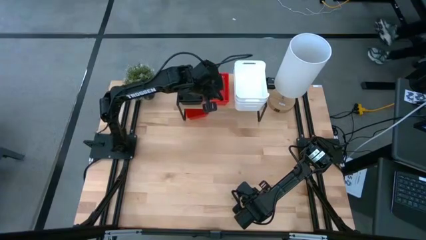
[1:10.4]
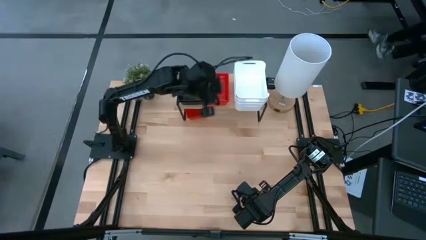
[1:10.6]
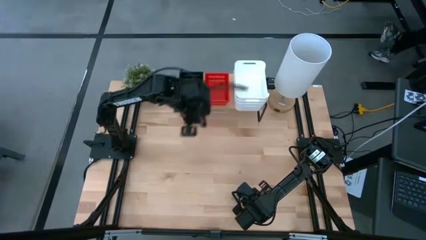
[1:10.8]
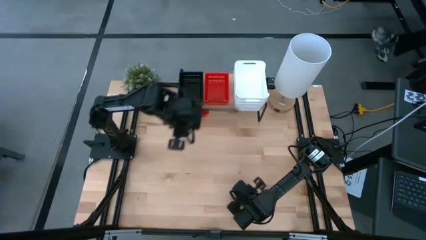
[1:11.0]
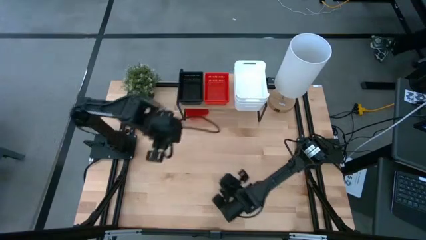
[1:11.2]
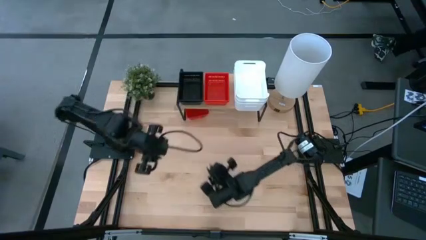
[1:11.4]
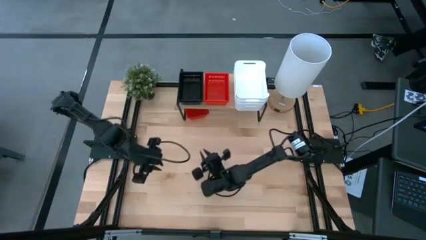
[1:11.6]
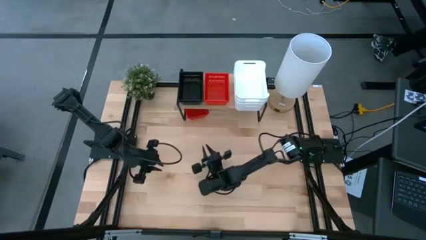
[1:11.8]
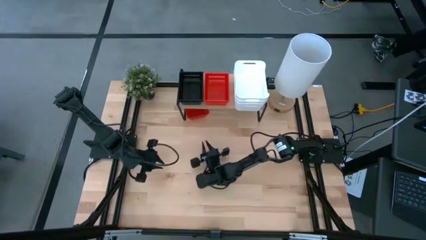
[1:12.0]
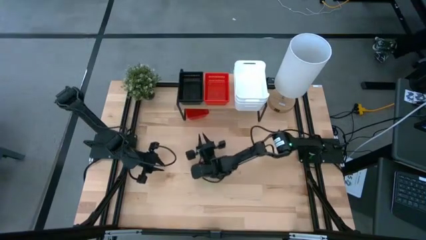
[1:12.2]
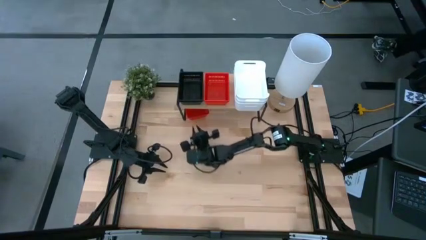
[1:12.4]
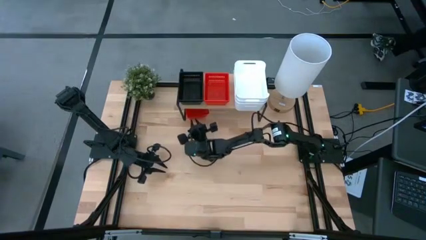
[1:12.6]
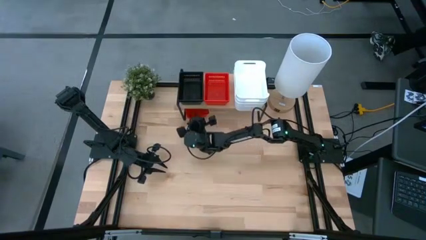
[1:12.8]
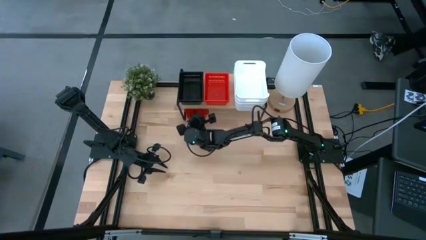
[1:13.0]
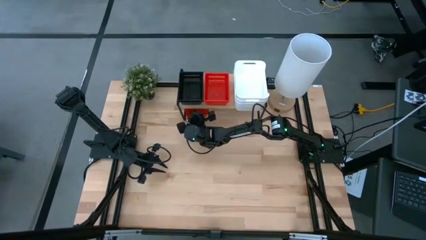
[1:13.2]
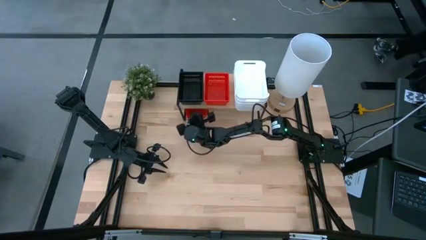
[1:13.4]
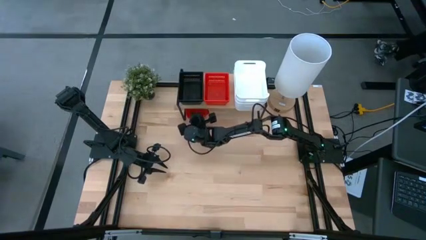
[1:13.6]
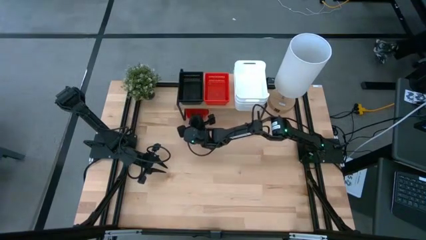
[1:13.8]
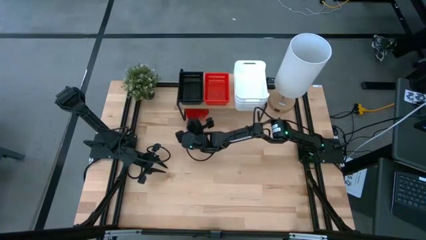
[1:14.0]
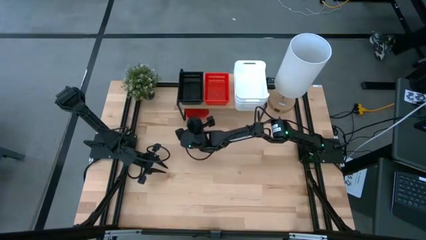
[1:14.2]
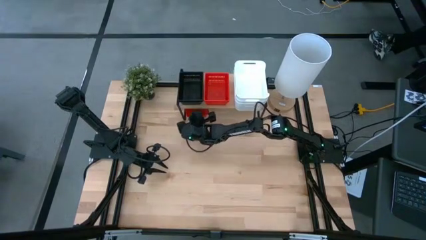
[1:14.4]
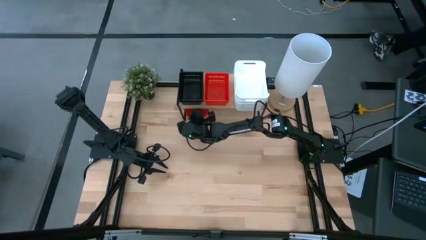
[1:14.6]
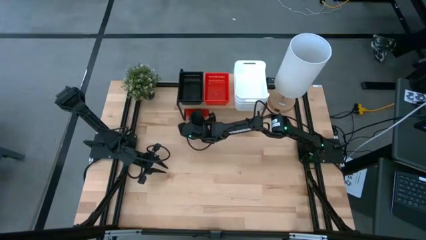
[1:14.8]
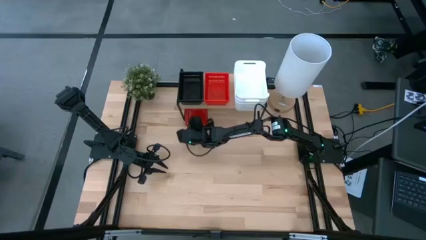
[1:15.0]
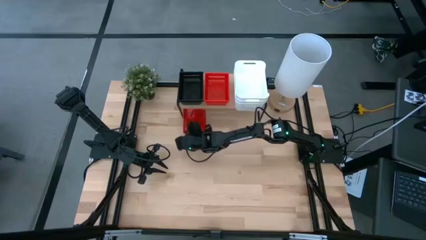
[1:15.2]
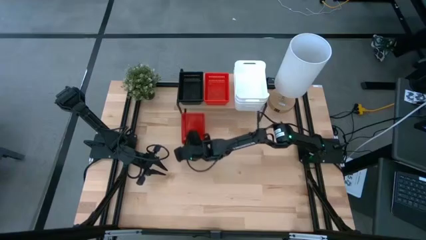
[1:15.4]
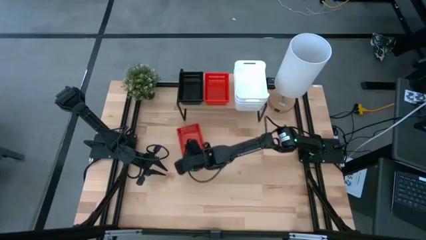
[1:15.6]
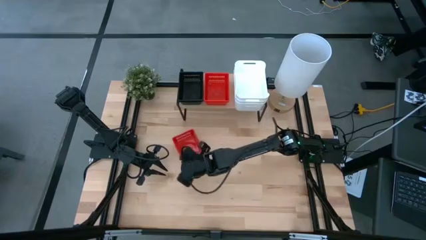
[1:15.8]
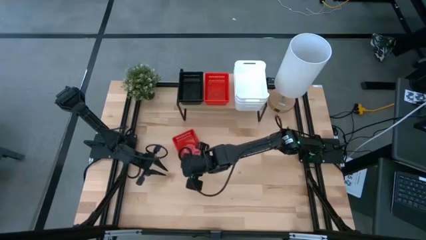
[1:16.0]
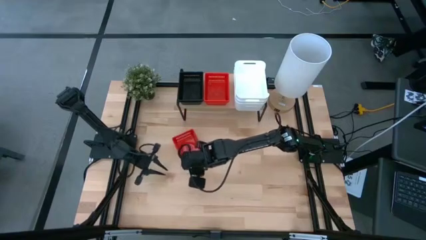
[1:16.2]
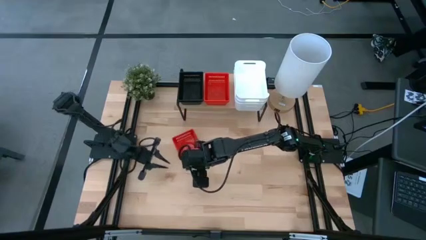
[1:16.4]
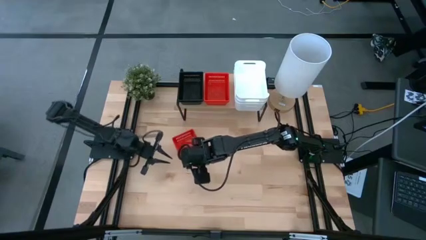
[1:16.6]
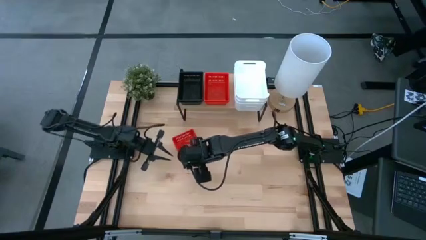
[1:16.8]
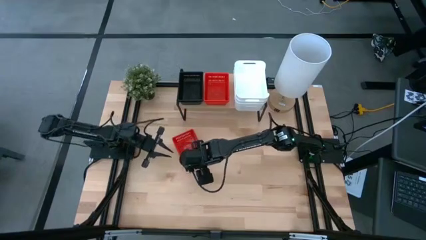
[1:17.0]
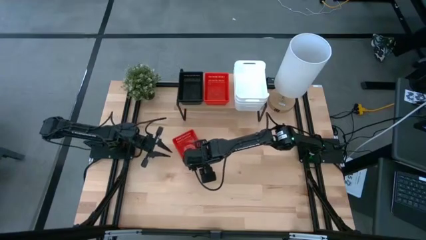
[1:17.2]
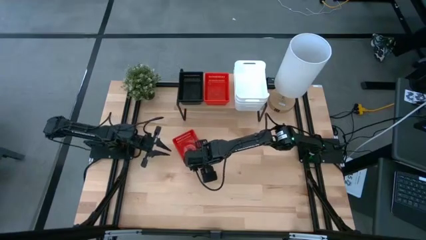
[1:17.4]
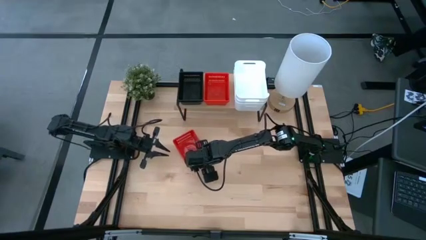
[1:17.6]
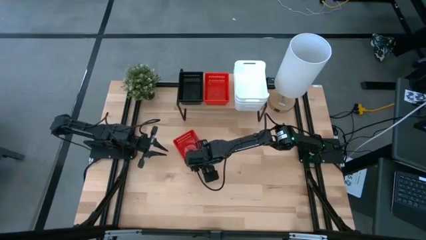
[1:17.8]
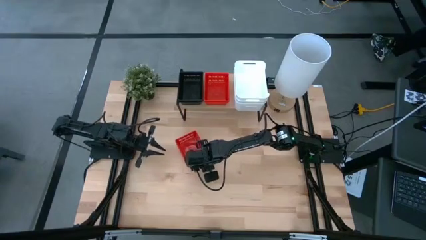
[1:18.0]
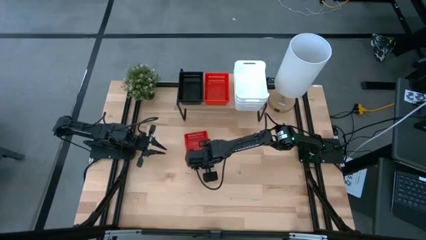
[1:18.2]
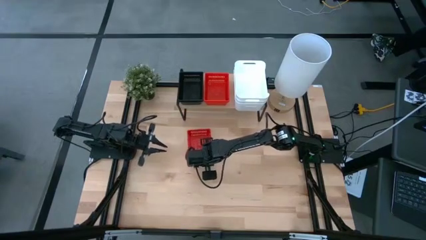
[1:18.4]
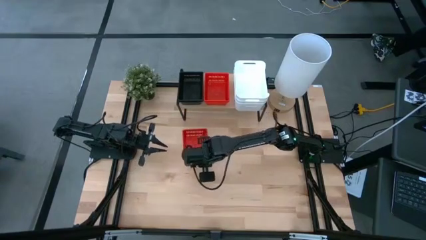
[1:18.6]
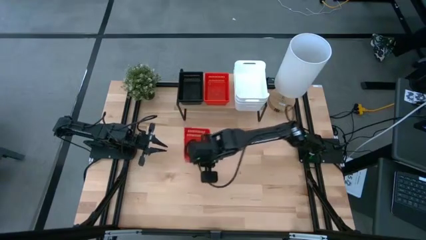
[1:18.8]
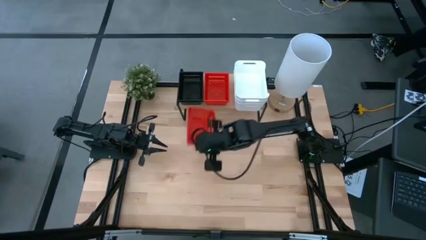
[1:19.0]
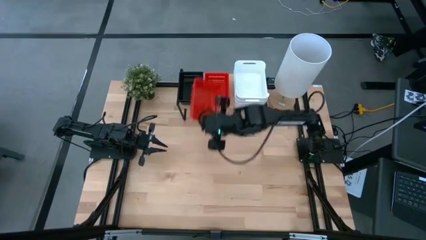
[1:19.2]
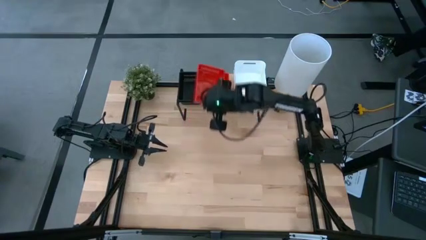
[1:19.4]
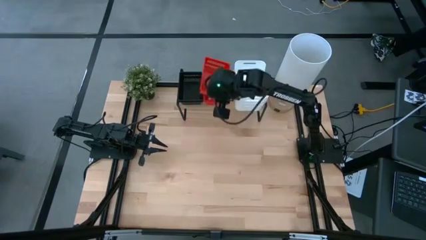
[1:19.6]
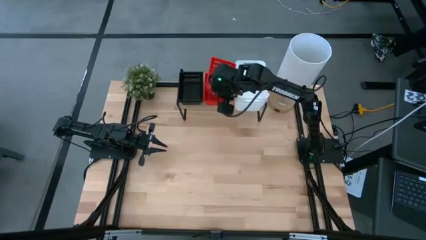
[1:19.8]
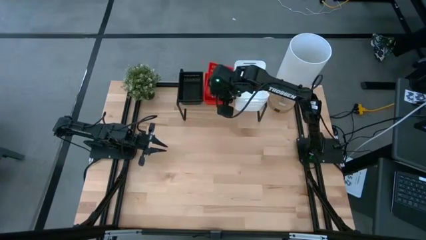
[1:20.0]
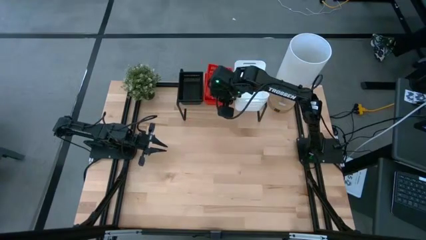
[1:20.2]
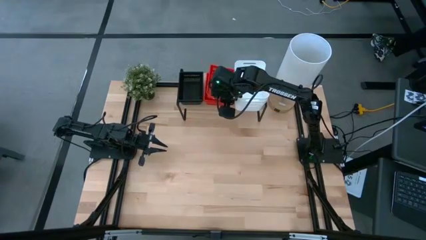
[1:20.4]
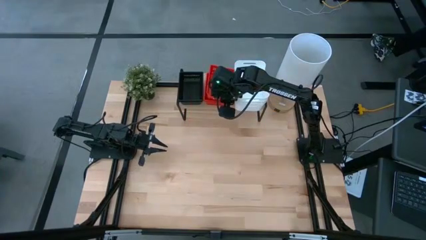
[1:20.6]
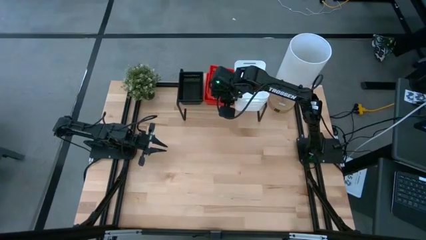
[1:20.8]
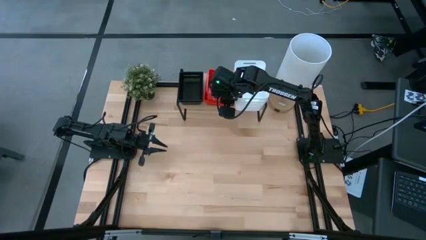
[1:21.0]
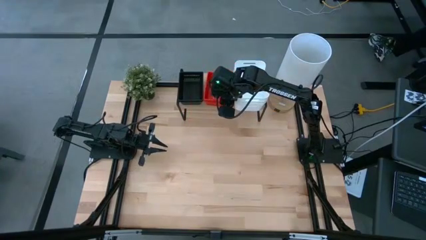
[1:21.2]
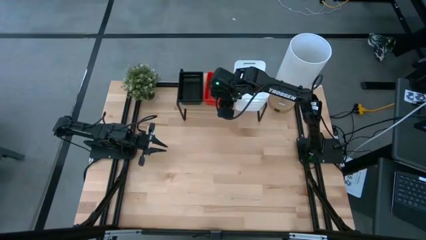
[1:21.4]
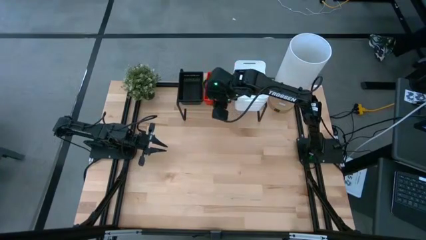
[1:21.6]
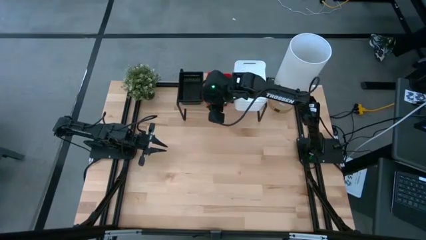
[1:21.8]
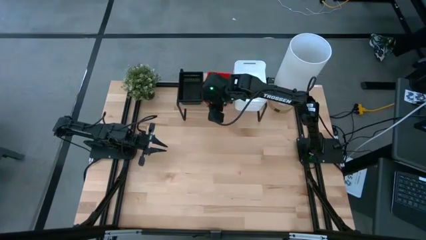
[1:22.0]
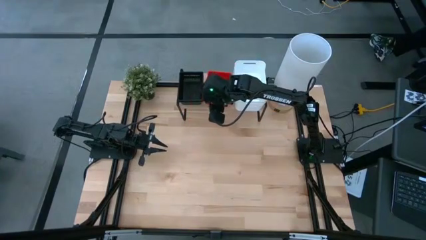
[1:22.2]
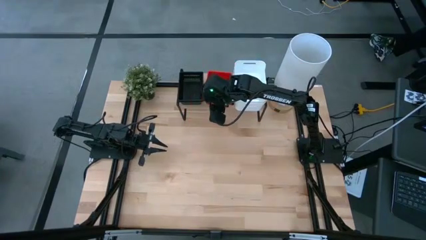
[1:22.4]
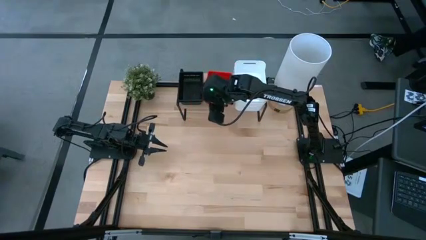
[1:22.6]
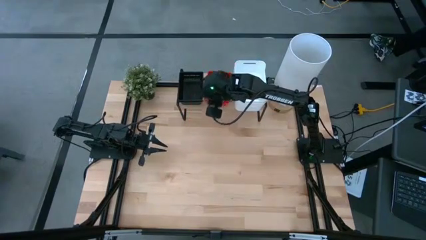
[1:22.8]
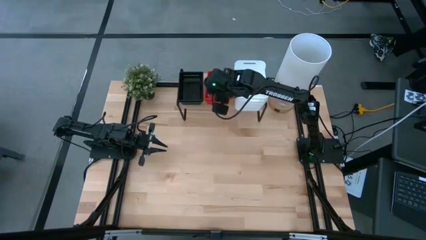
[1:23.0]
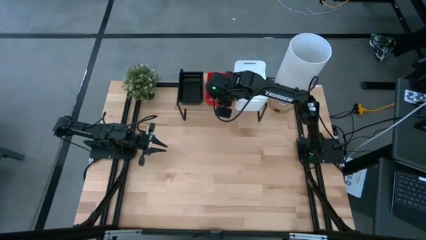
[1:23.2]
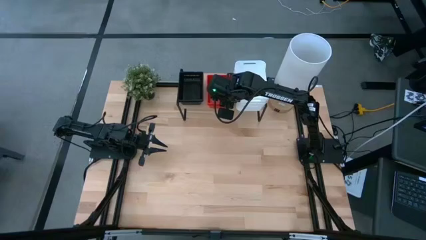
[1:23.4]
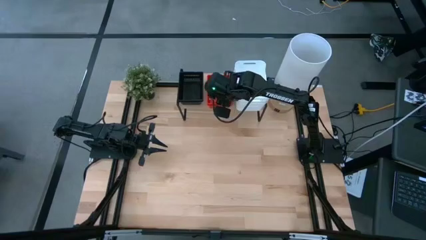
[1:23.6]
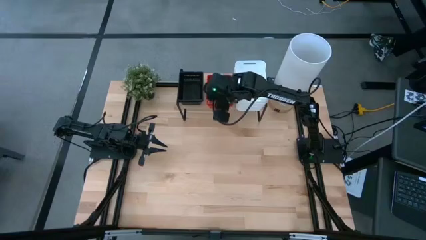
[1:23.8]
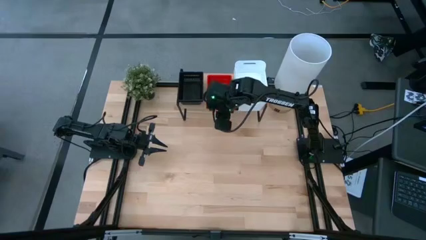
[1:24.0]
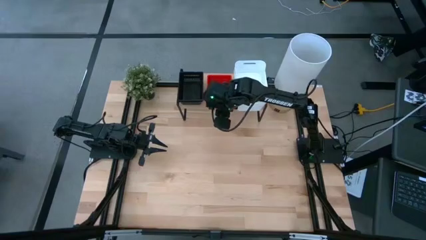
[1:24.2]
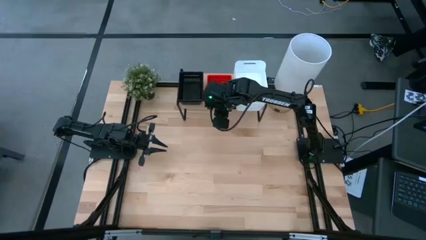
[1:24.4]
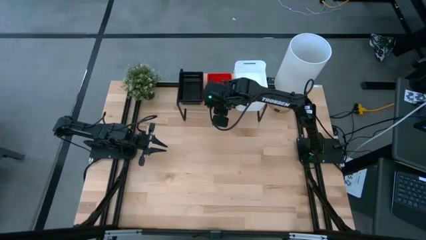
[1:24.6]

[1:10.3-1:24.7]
Task: Stack baskets on shelf by color
Stack the red bin on top of the stacked red bins on the shelf

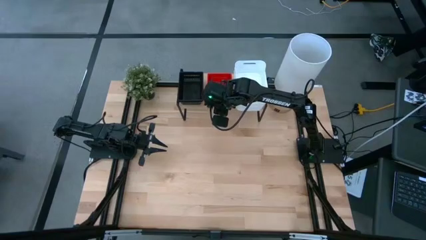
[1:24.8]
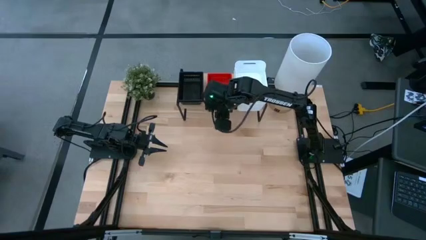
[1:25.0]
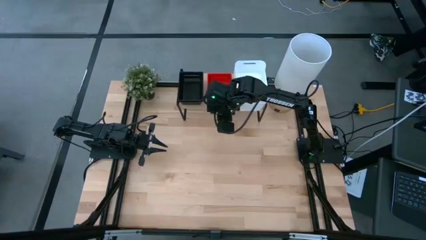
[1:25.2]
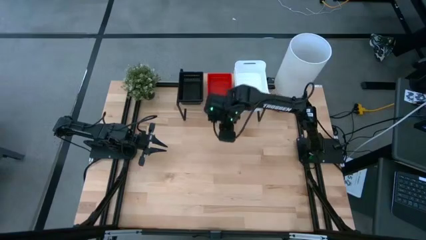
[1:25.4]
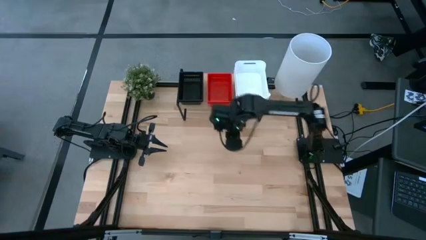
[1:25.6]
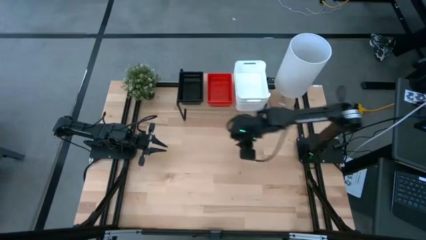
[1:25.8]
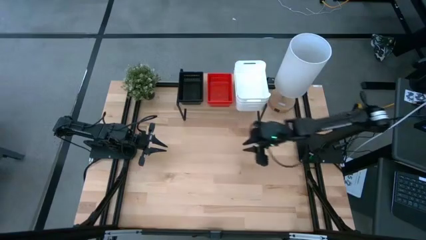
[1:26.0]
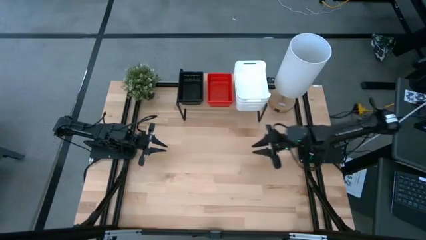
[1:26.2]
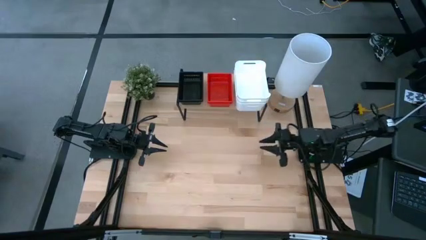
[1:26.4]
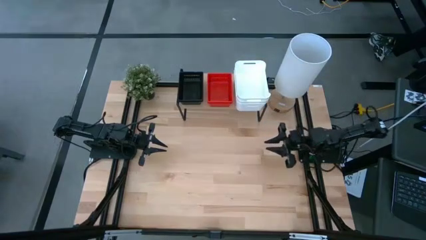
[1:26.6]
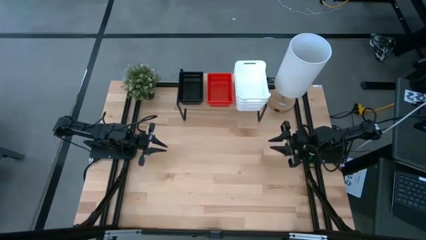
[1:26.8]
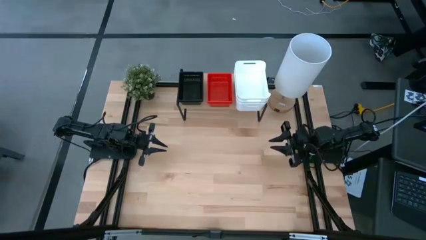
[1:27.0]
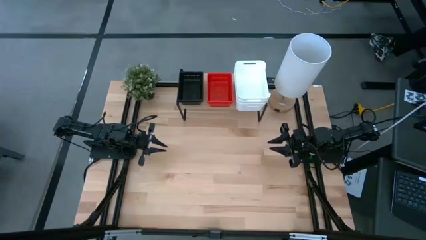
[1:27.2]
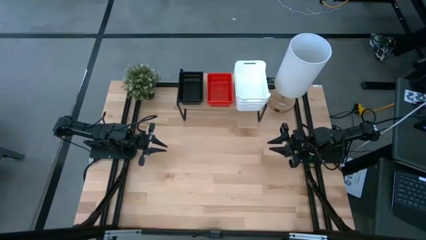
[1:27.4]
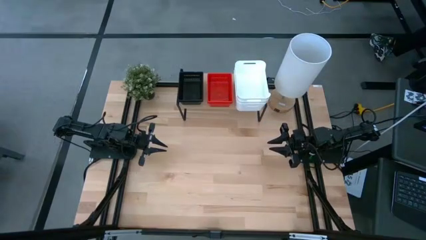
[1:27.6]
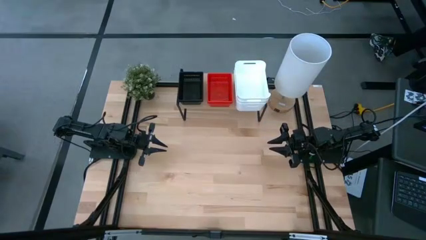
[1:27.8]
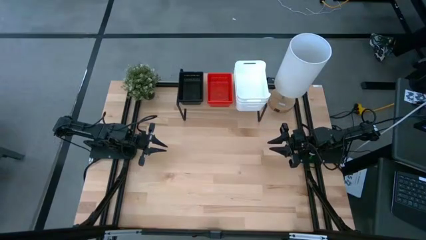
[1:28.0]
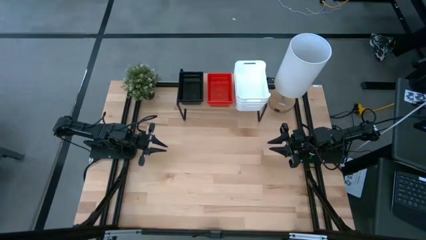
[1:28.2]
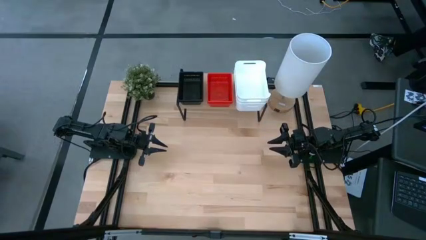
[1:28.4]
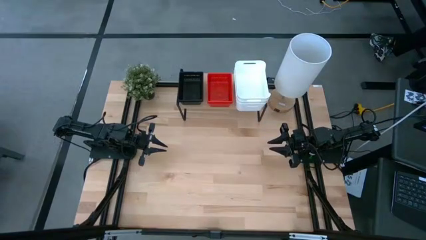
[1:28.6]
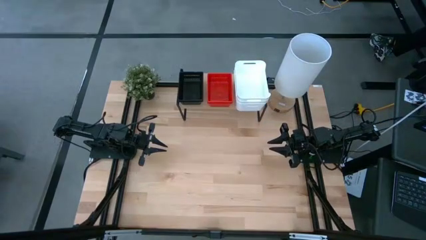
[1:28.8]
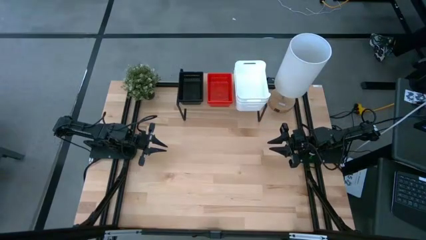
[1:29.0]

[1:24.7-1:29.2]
Return to Home Position
